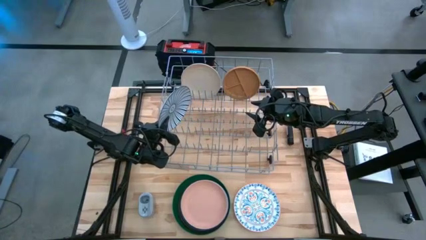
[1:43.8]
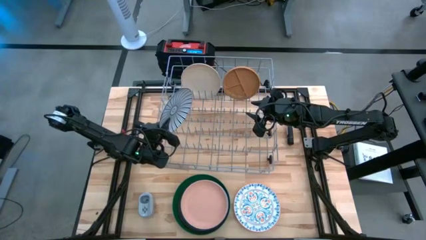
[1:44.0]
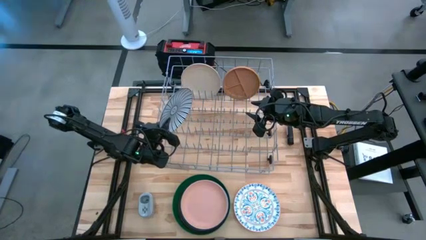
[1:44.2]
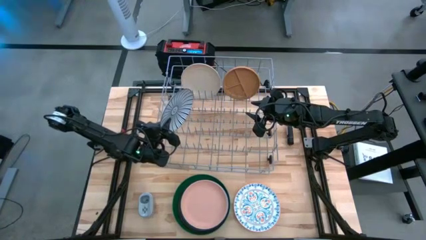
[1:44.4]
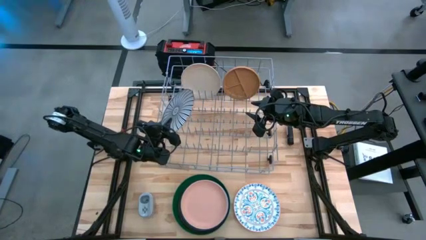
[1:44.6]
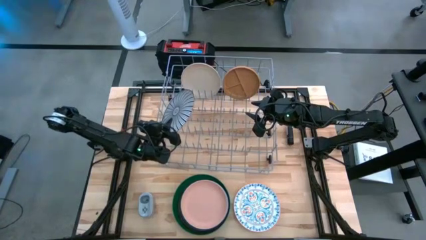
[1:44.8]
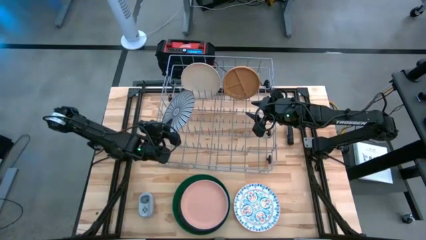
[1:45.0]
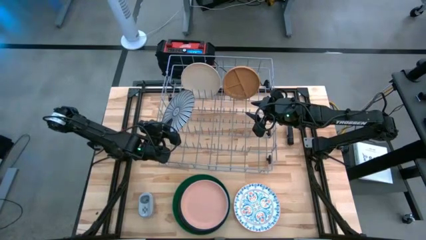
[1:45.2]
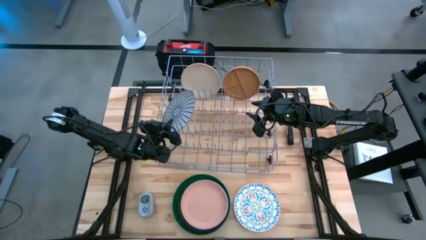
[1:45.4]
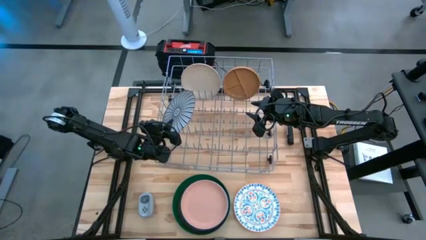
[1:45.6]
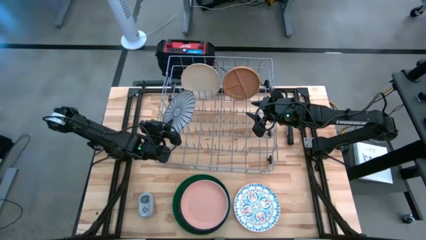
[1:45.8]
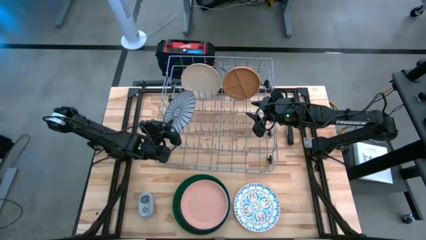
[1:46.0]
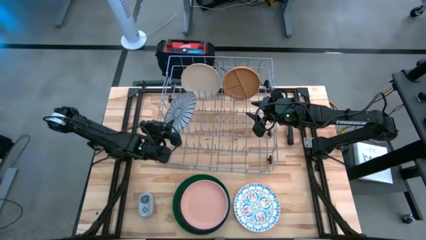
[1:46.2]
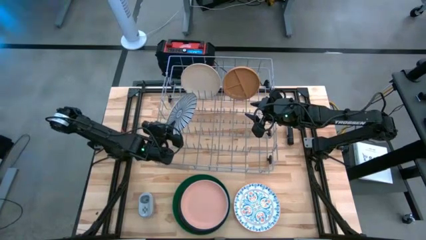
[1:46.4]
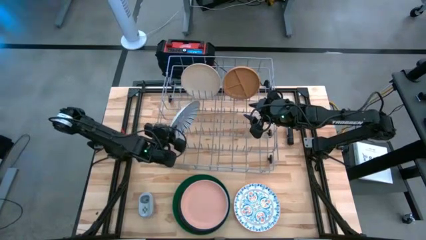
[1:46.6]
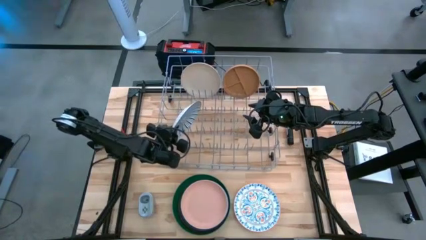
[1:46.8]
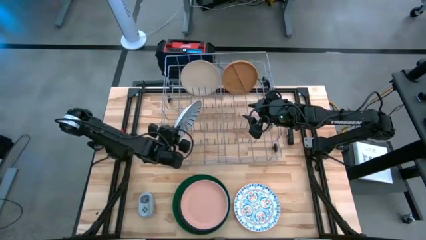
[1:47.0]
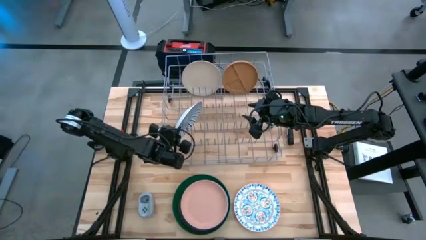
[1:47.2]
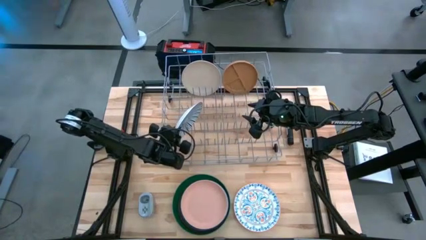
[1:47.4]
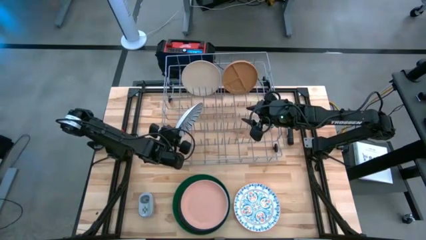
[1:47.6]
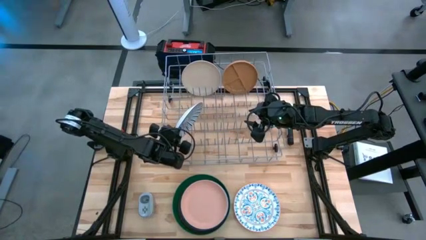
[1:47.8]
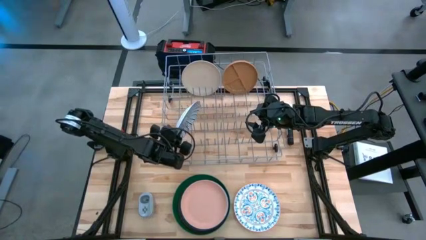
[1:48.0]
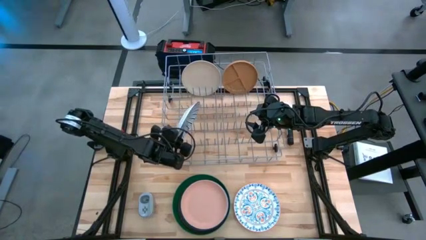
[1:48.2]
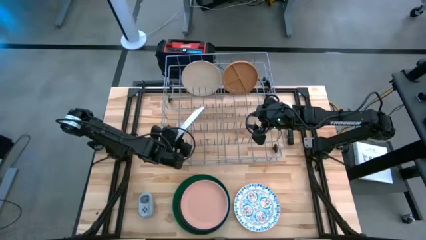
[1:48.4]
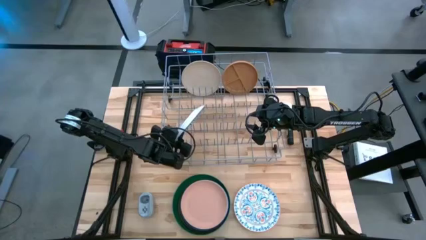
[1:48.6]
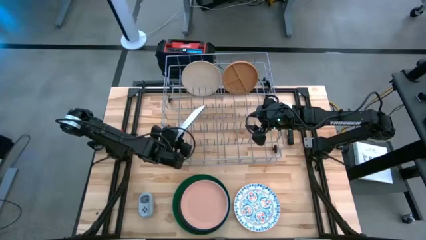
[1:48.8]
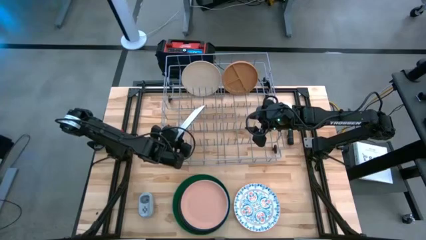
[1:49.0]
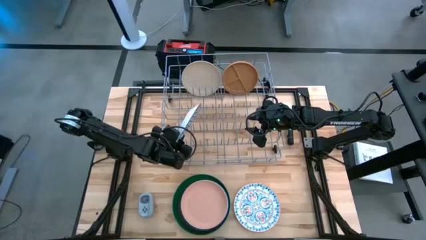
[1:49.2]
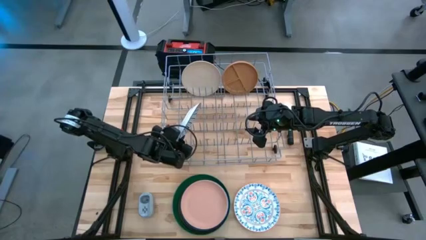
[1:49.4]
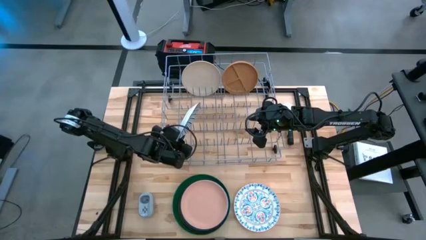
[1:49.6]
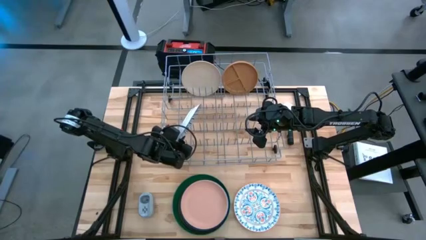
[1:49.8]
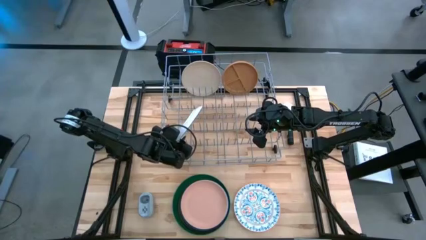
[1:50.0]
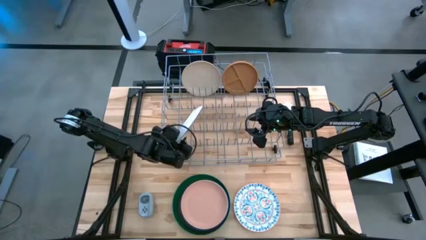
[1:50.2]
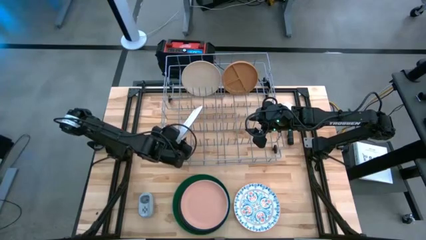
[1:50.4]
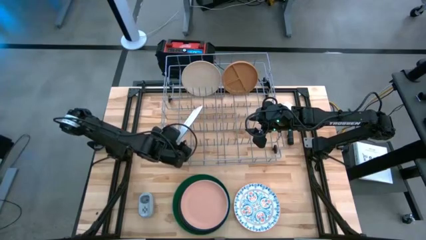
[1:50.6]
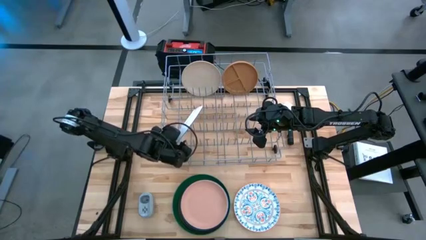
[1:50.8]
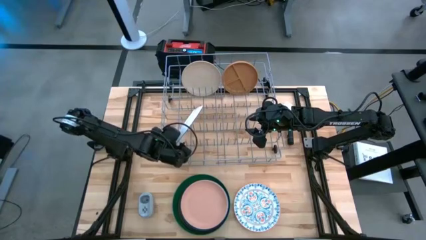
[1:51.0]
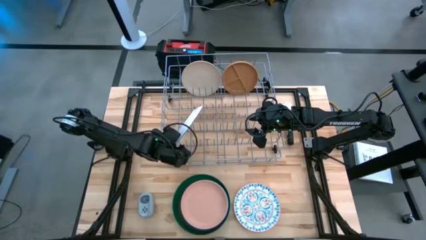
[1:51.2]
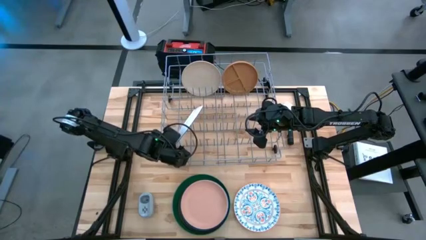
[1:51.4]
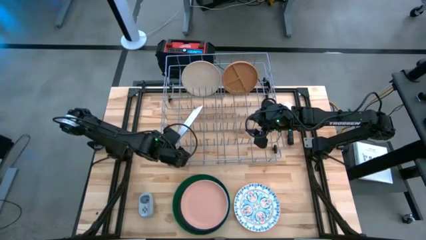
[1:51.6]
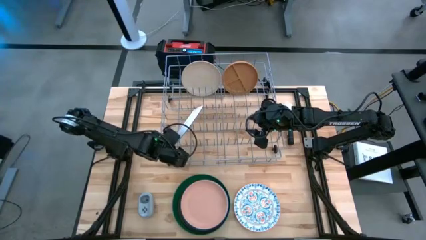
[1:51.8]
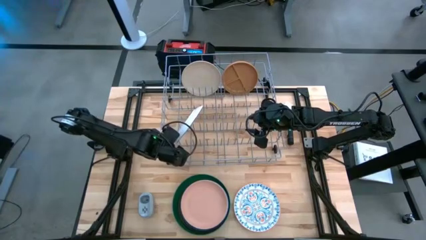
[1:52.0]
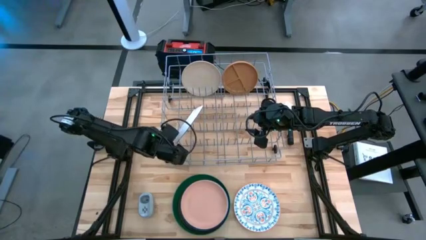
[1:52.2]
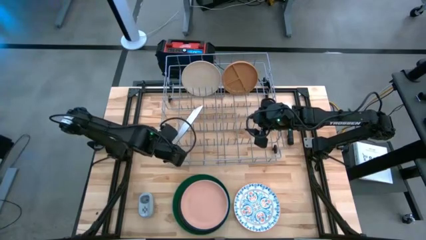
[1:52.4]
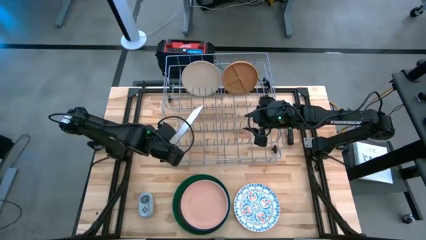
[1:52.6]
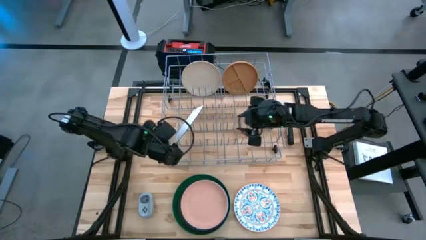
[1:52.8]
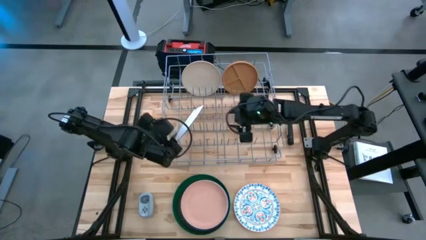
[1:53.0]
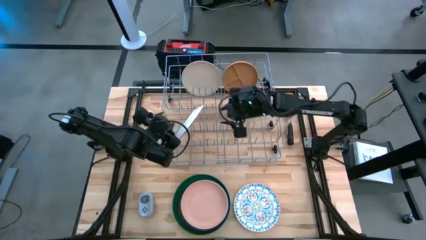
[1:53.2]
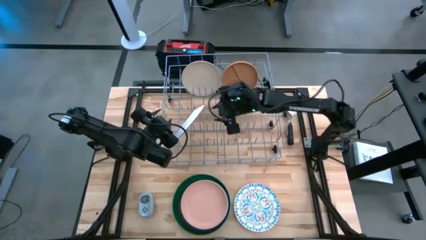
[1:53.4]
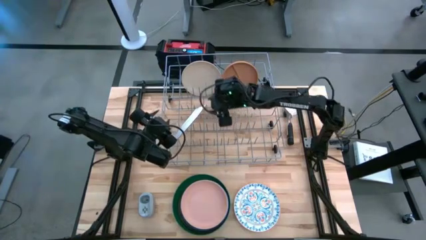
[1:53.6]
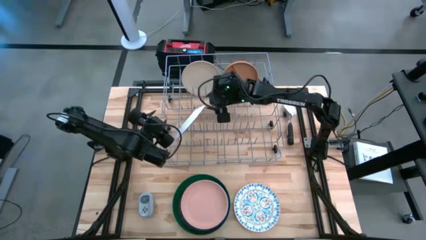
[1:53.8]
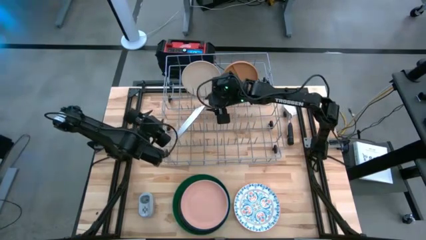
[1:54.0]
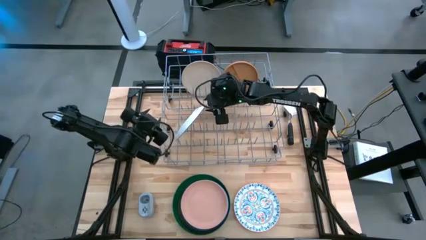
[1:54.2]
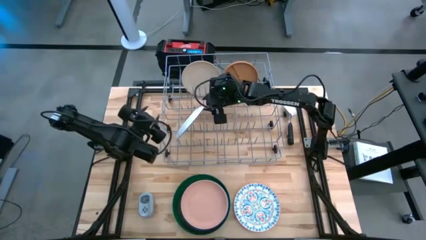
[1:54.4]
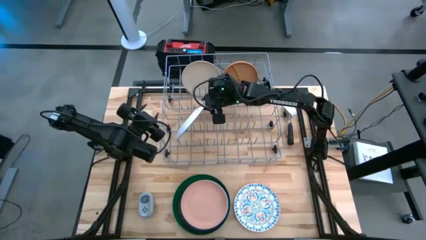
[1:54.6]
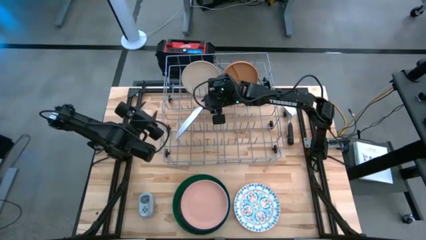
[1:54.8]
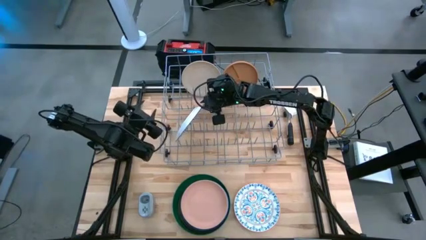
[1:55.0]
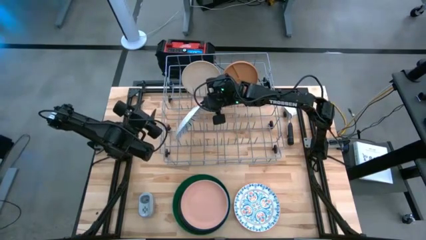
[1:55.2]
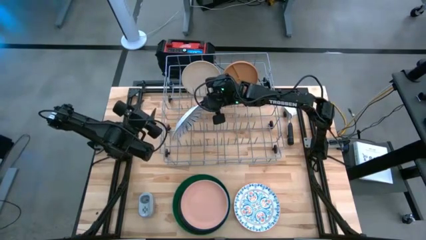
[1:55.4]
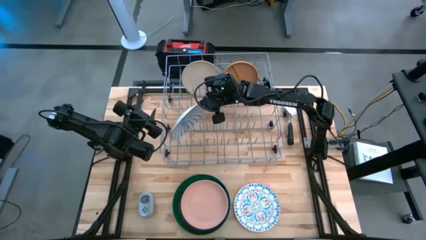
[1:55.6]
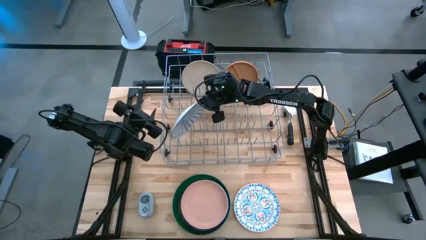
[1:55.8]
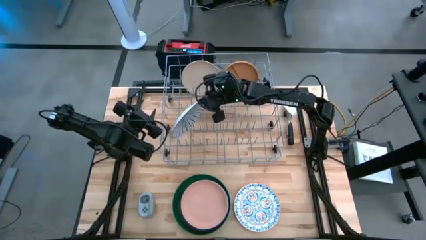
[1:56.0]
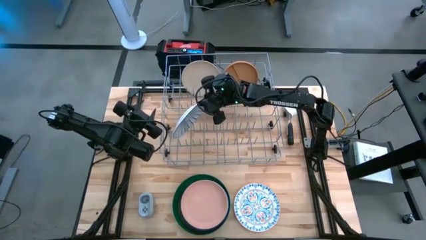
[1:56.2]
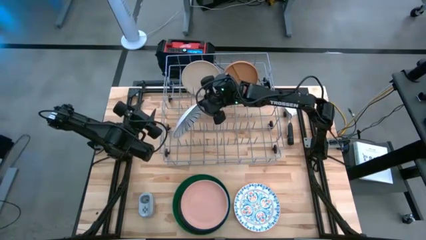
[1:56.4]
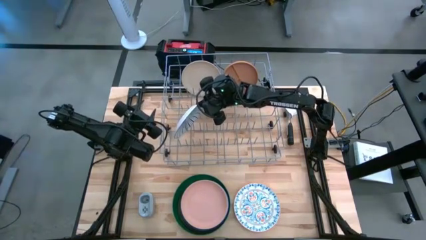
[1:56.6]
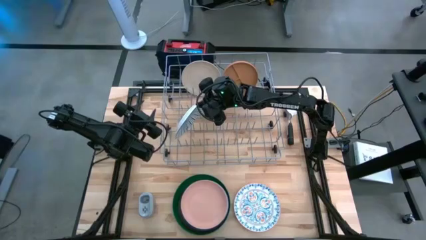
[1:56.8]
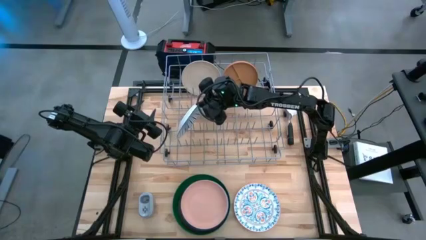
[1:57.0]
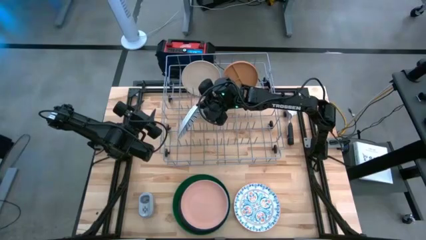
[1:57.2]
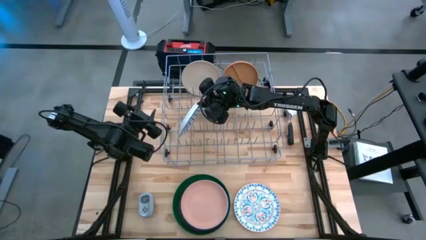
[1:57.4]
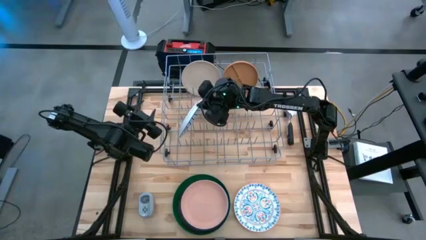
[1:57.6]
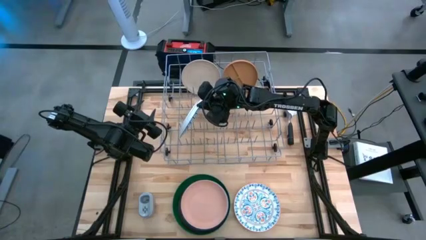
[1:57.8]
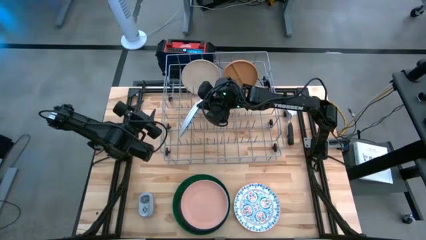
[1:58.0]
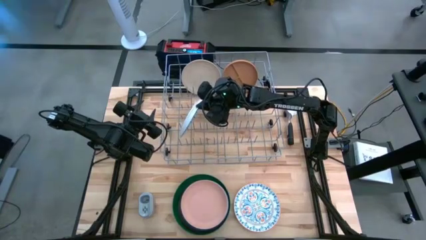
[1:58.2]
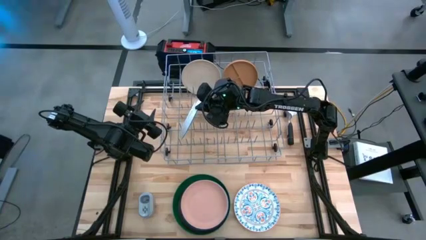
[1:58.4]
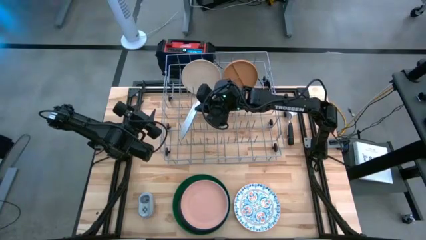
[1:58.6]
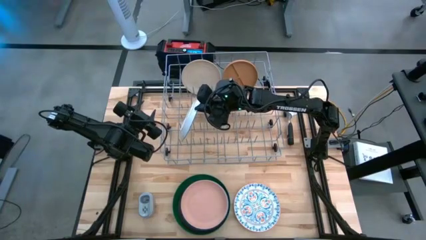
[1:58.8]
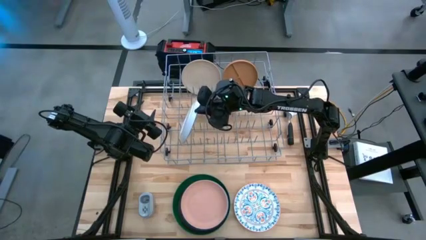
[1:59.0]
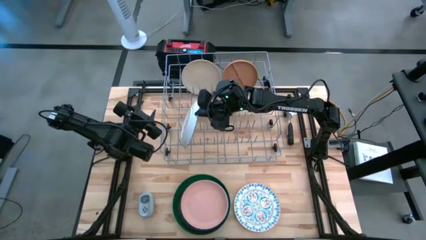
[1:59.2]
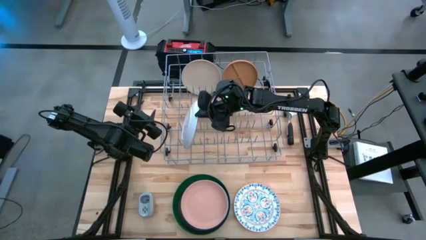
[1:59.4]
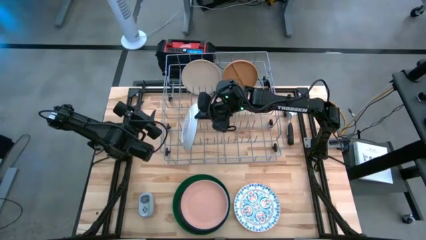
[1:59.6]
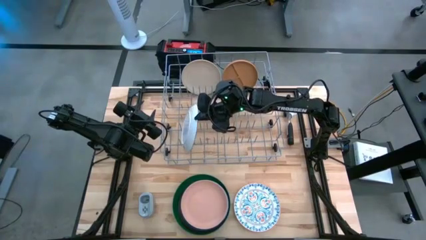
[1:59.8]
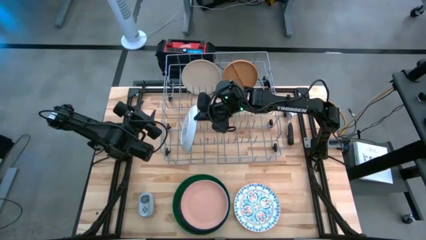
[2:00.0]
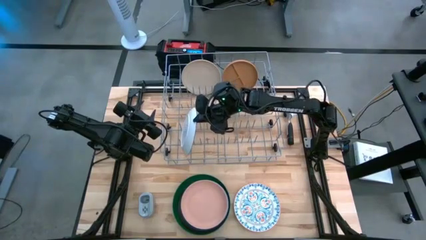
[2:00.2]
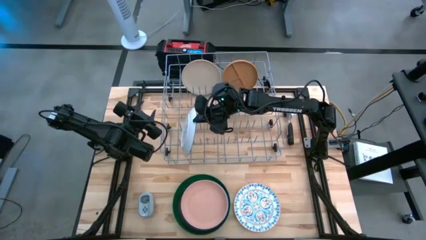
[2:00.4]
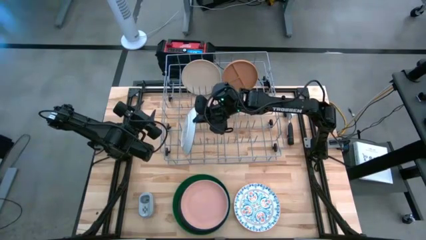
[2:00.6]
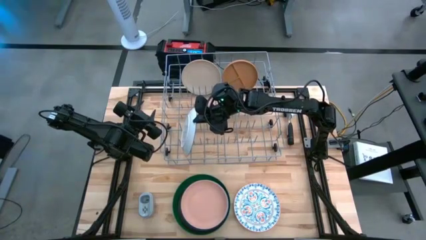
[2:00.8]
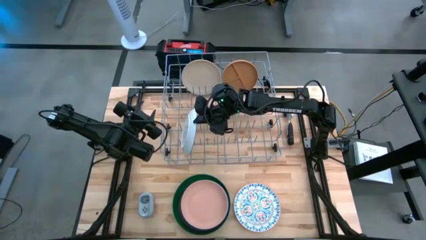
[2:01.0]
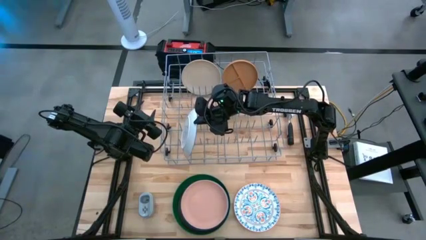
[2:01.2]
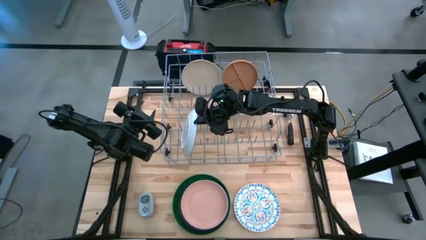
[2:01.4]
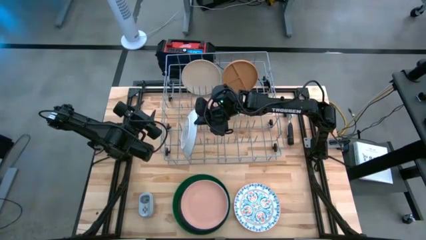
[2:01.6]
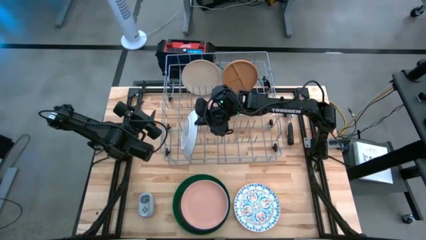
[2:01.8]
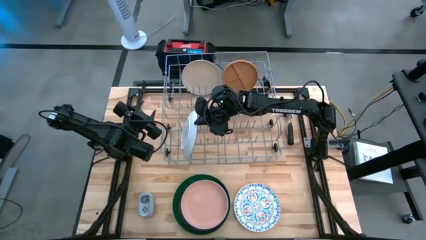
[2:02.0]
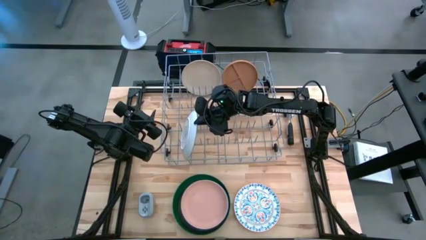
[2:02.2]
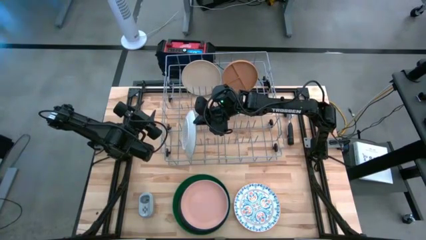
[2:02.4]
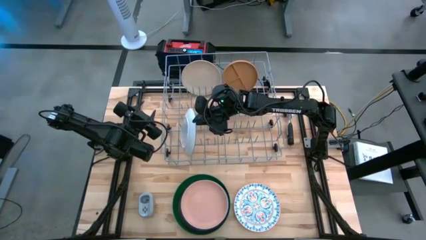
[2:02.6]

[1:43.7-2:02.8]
Task: Sort dishes
Put the blue patterned plate into the dish rack
